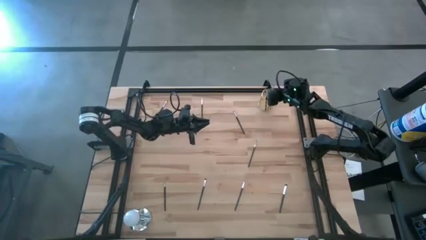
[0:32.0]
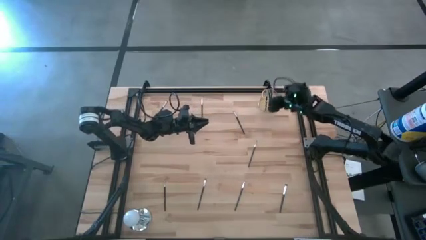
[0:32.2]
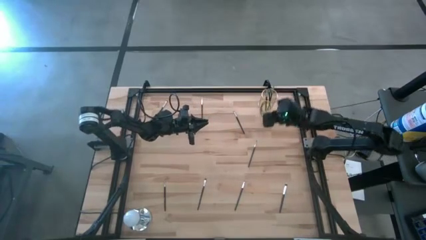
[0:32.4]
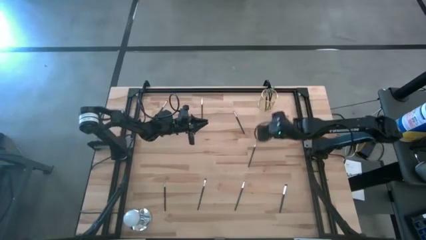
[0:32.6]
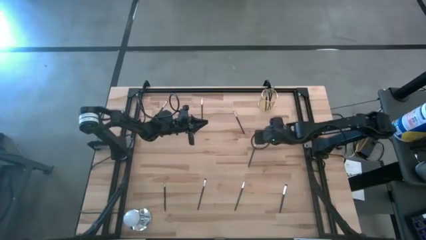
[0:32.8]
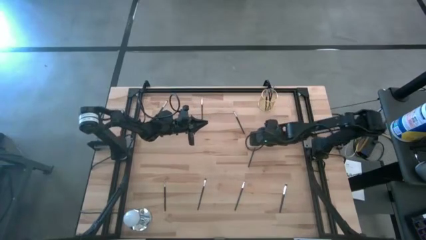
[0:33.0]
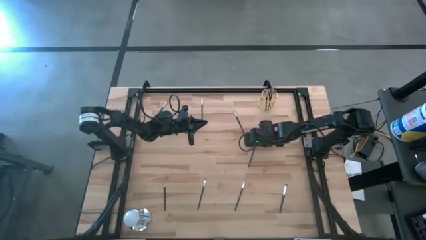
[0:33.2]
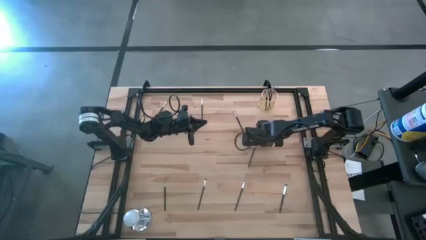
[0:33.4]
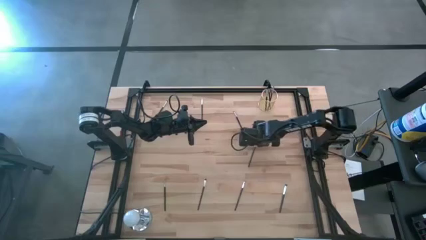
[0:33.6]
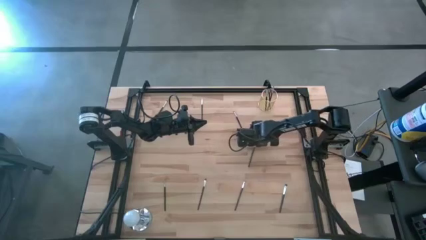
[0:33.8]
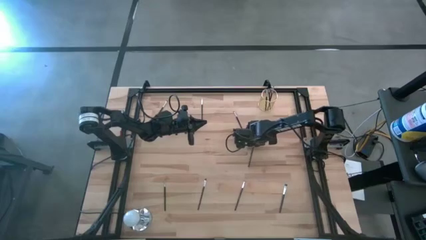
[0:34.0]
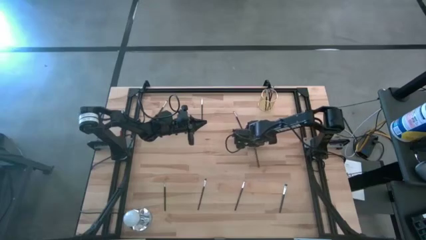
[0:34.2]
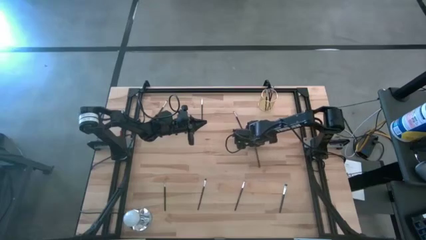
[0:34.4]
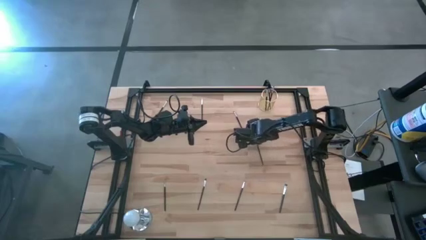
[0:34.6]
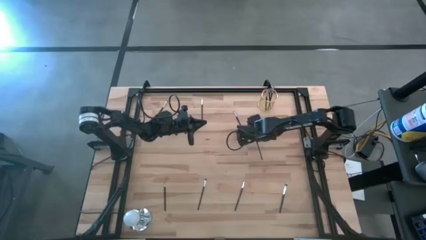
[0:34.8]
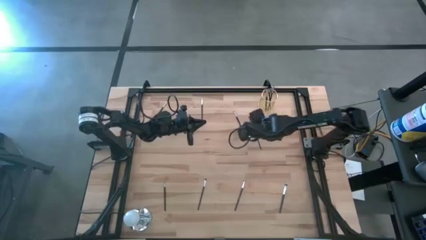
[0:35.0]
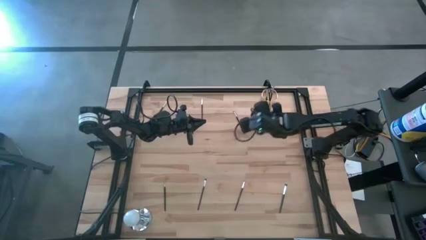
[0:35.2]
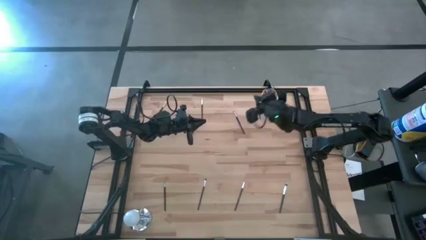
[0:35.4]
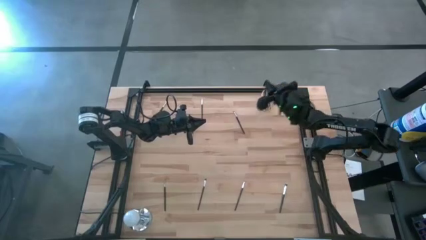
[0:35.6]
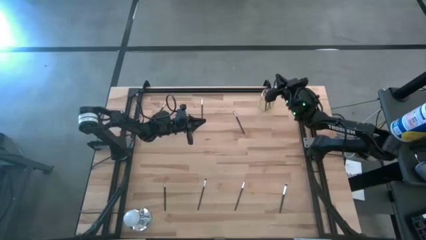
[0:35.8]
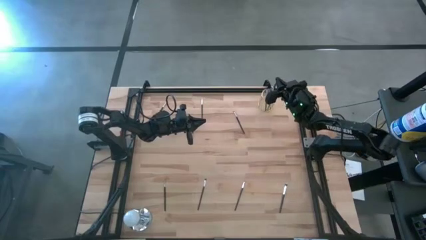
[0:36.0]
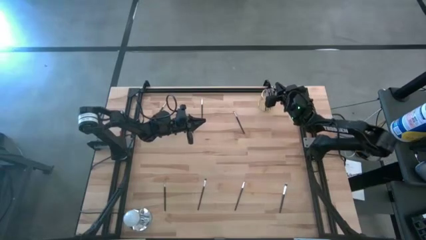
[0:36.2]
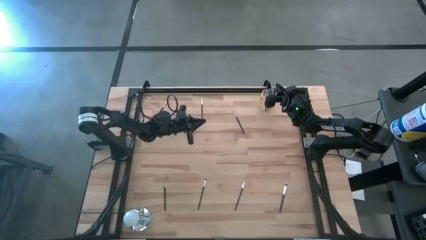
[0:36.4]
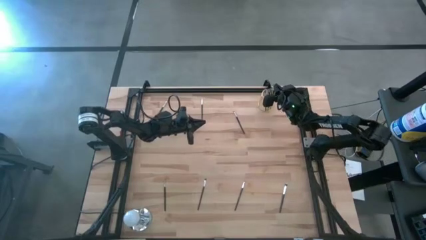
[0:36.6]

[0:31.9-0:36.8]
Task: Put items in baskets/containers
Put the black eyeshadow brush into the gold pen holder

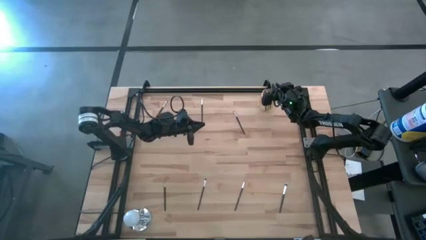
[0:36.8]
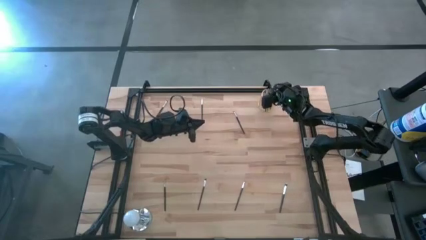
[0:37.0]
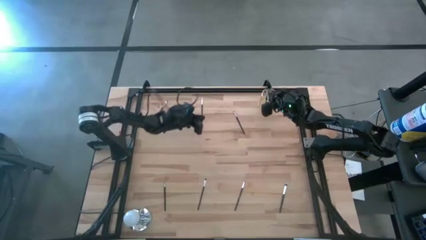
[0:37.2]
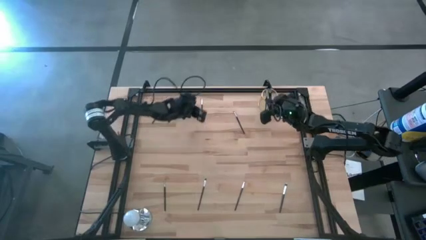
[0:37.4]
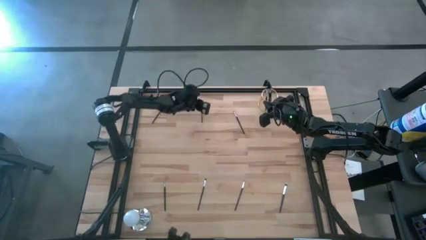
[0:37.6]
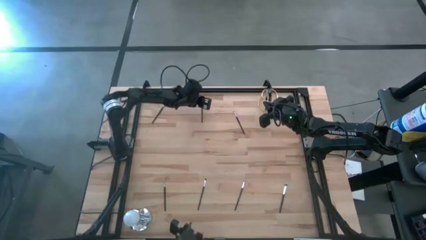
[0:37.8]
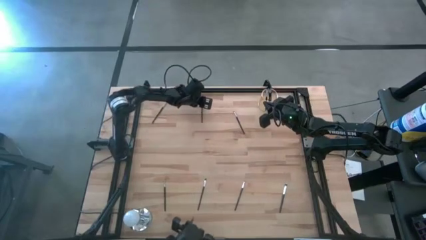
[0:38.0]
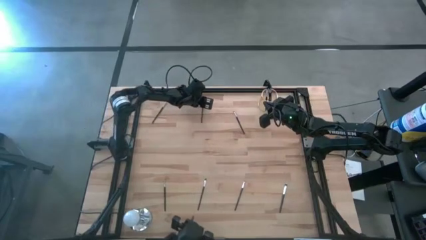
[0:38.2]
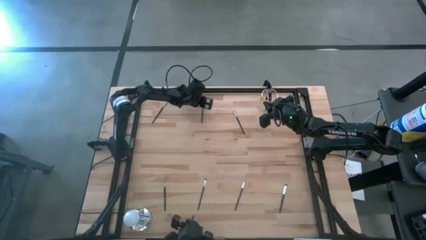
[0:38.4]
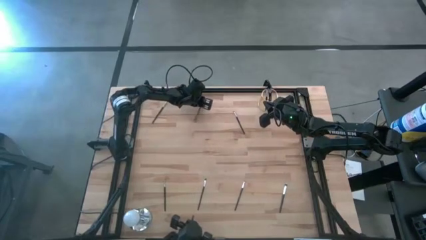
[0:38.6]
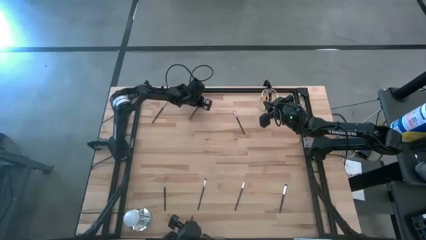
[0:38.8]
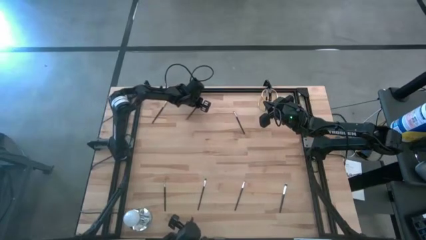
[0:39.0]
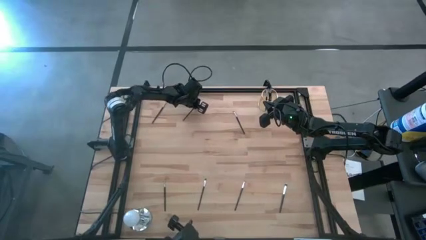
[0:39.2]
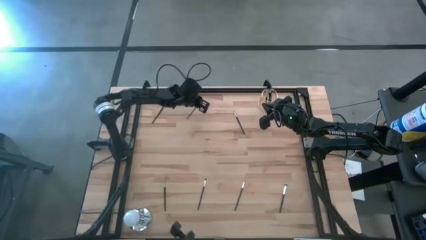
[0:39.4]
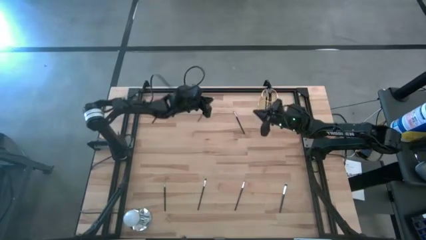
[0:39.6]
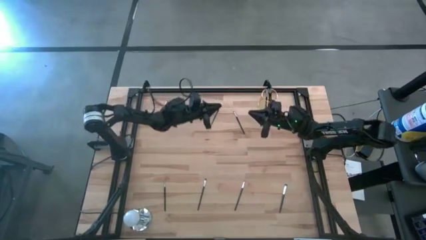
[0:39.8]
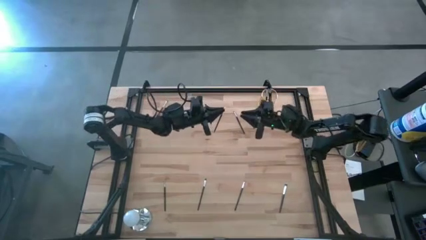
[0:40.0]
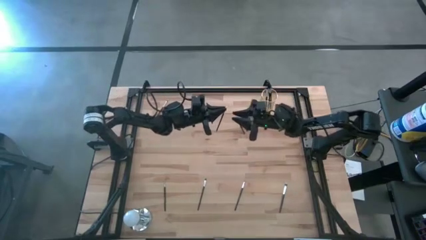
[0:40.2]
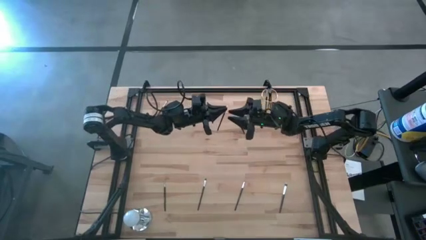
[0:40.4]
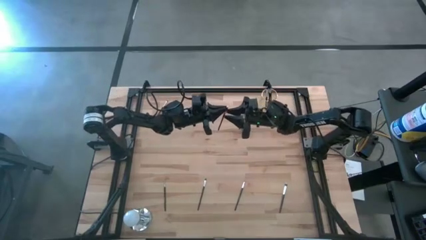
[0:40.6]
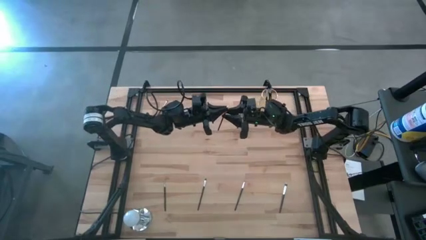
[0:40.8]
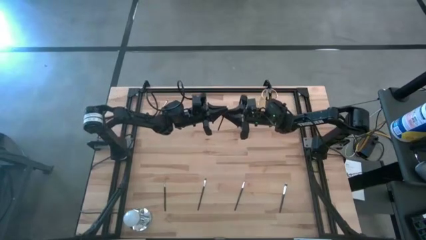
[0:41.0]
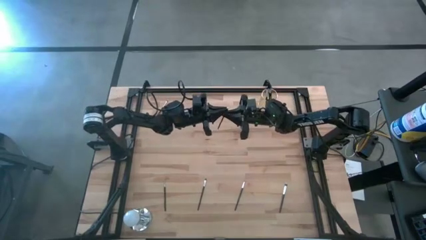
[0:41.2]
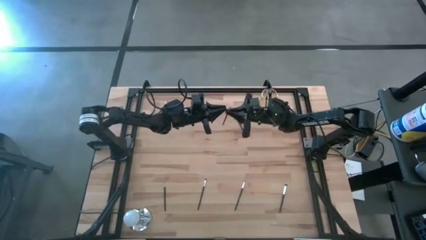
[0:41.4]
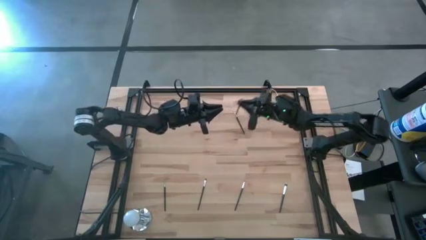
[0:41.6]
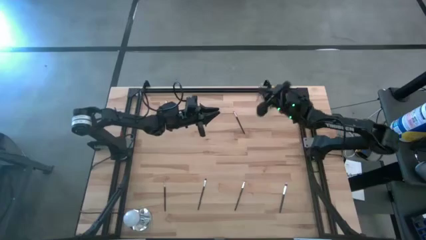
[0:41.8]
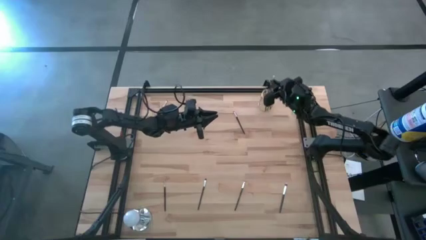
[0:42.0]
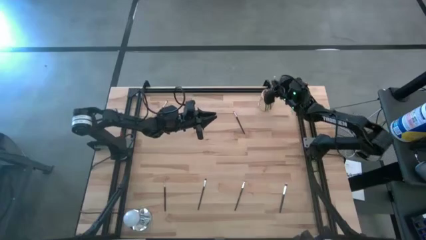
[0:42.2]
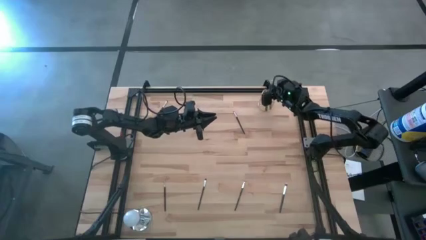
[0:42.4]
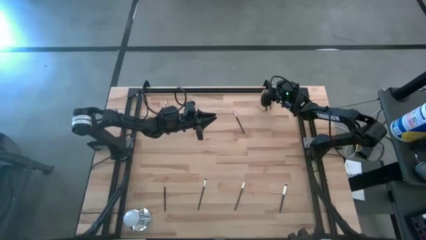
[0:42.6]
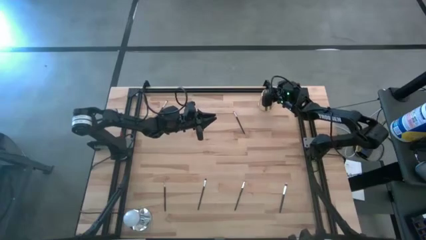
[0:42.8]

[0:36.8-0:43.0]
Put the black eyeshadow brush into the gold pen holder

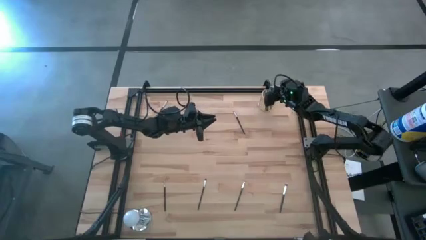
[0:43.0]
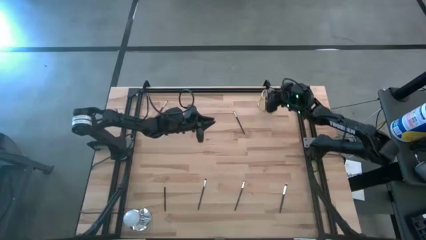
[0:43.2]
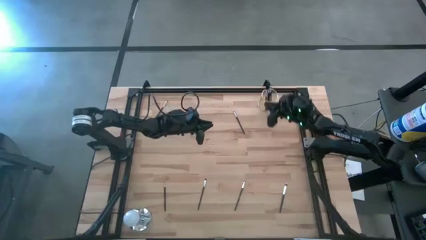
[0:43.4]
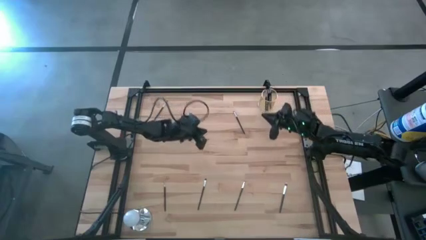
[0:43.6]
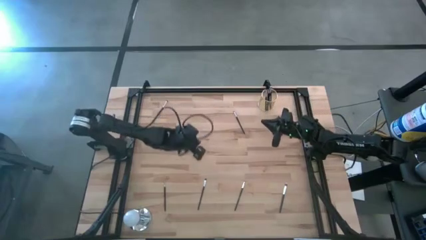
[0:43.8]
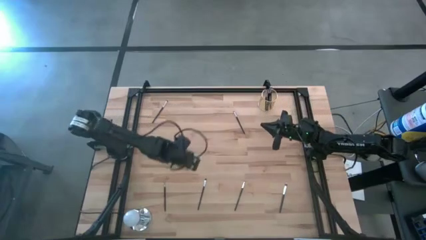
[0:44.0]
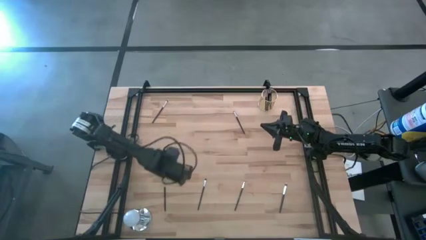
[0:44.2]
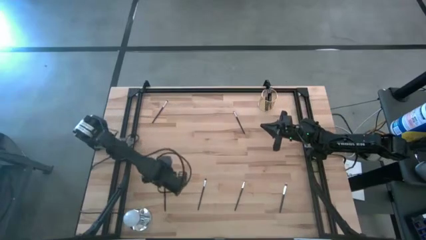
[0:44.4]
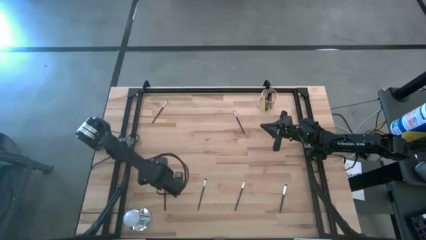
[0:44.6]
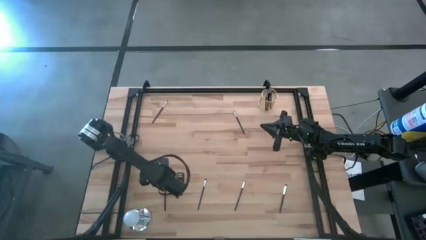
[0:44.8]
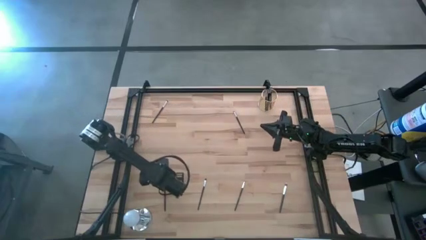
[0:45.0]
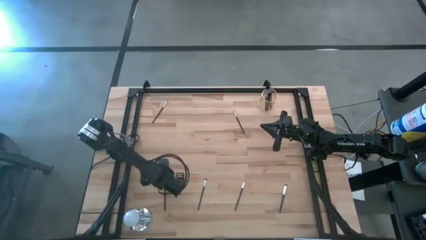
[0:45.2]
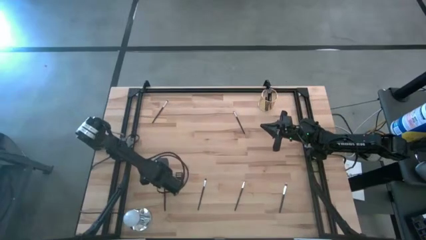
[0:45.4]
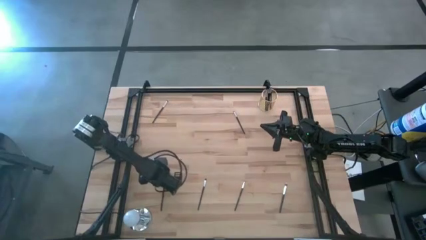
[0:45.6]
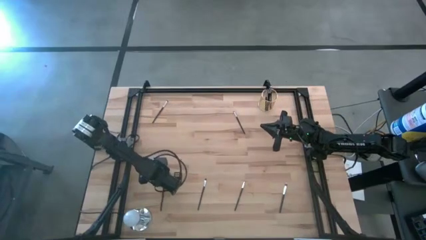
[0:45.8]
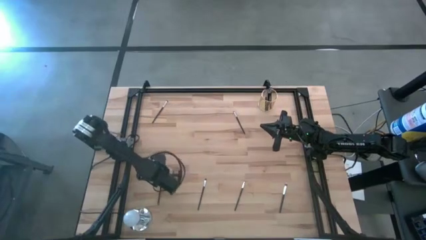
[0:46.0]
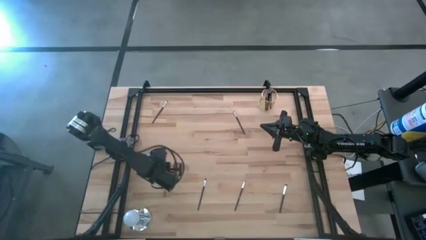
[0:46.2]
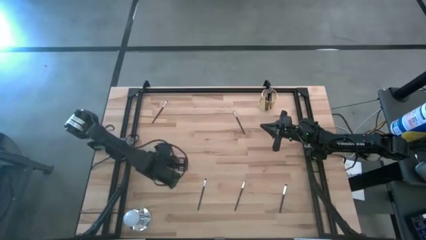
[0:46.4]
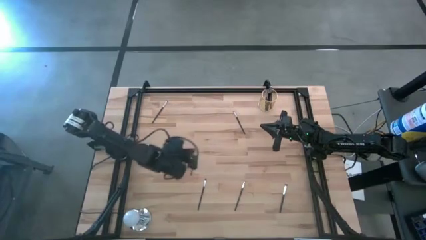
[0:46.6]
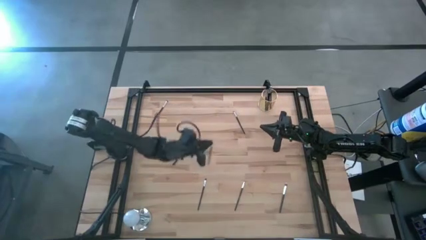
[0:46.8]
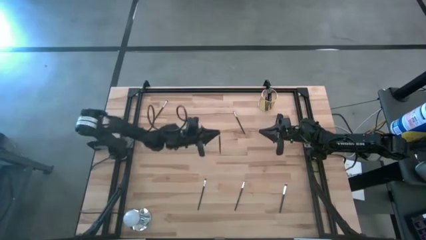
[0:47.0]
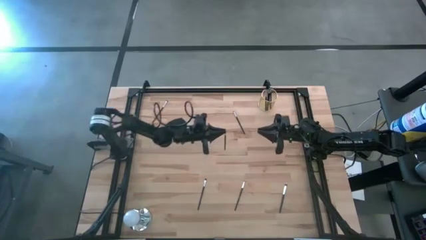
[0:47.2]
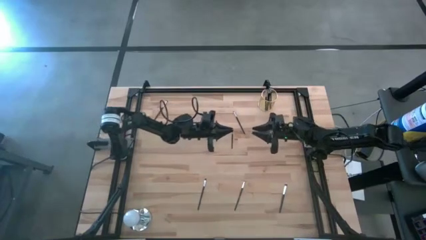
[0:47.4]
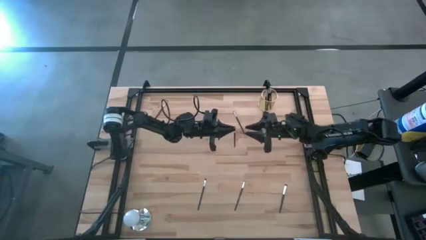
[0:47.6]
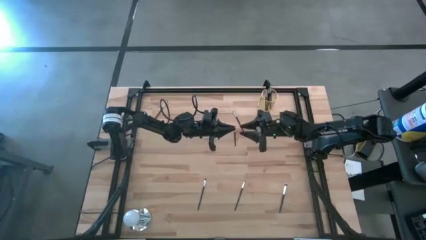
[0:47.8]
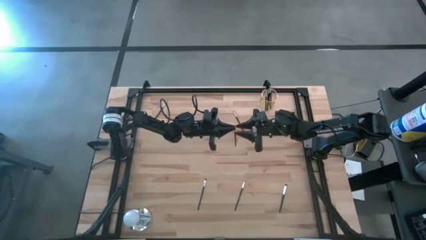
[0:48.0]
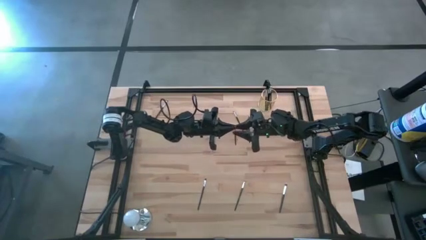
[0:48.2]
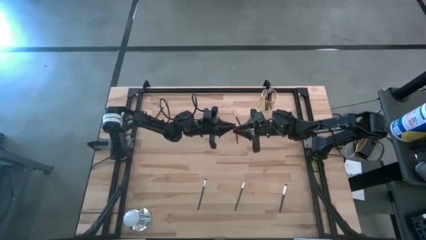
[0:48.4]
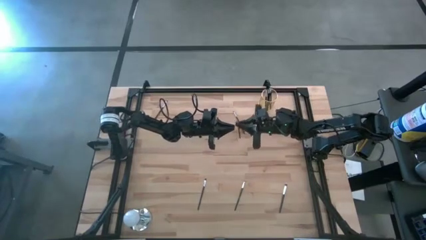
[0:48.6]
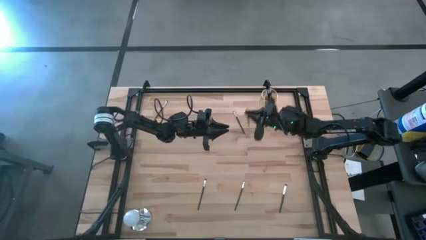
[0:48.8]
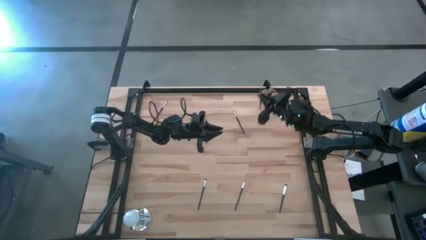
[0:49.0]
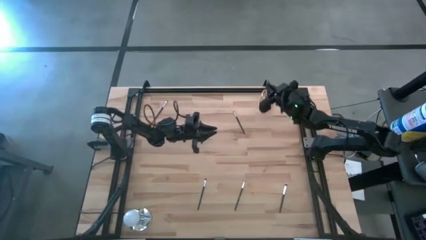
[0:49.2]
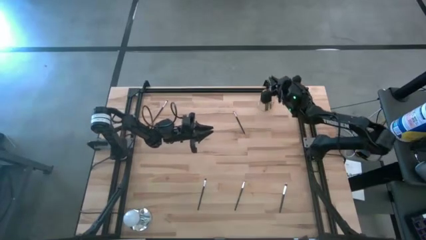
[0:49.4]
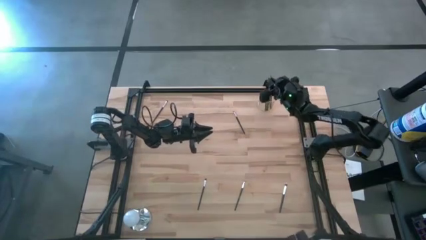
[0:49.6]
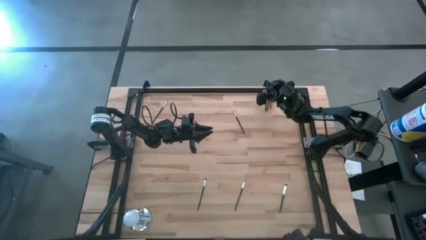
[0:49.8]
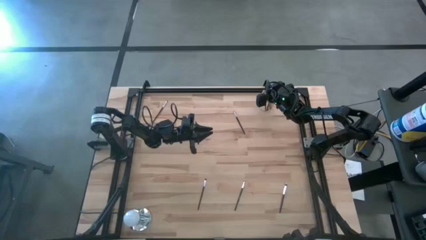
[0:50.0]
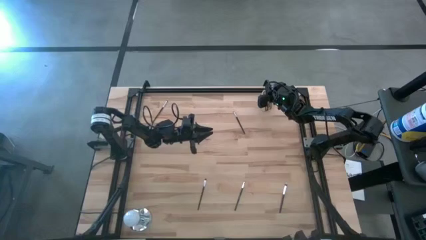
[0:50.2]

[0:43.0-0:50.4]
Put the black liner brush into the gold pen holder
